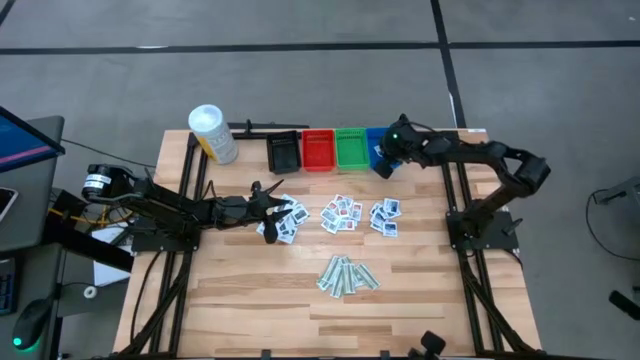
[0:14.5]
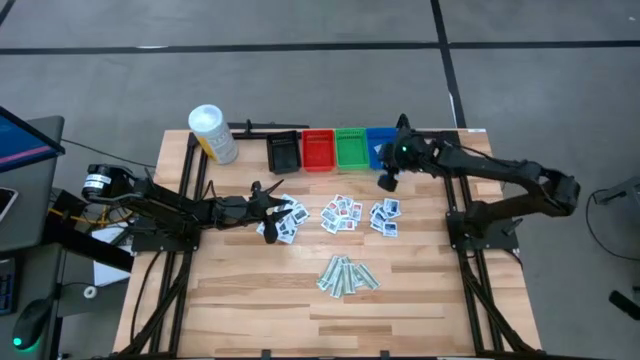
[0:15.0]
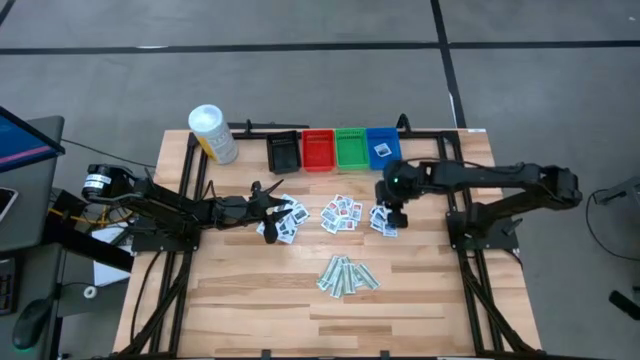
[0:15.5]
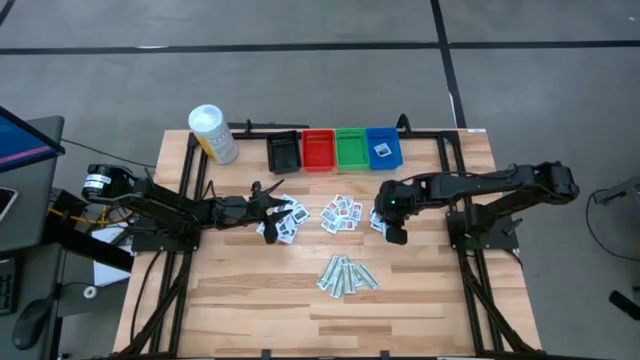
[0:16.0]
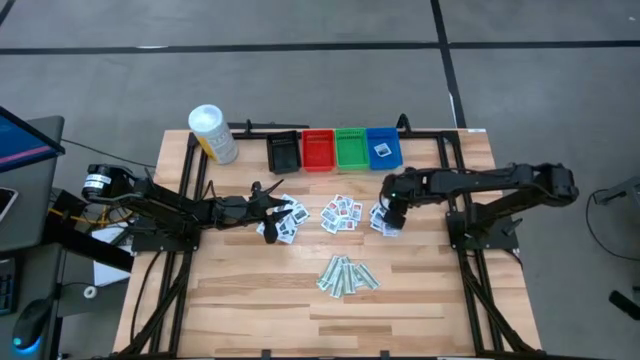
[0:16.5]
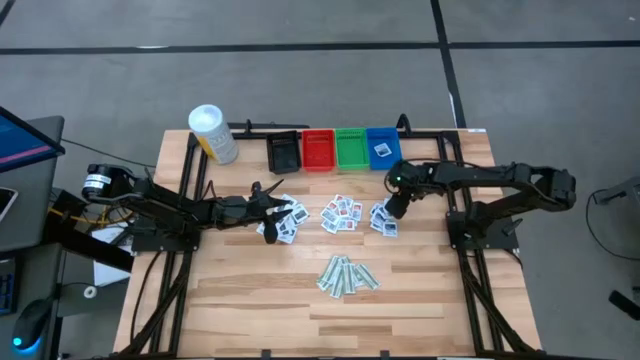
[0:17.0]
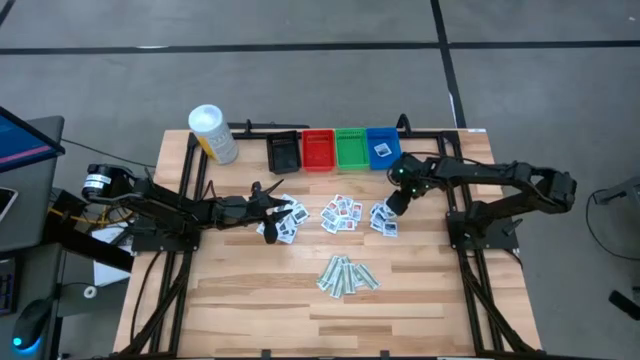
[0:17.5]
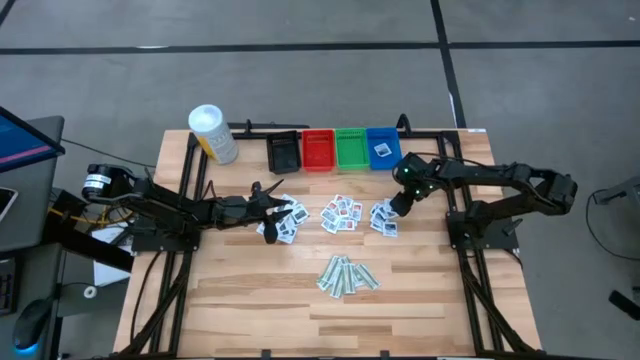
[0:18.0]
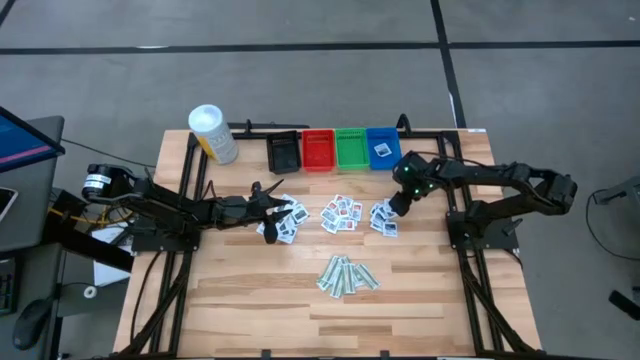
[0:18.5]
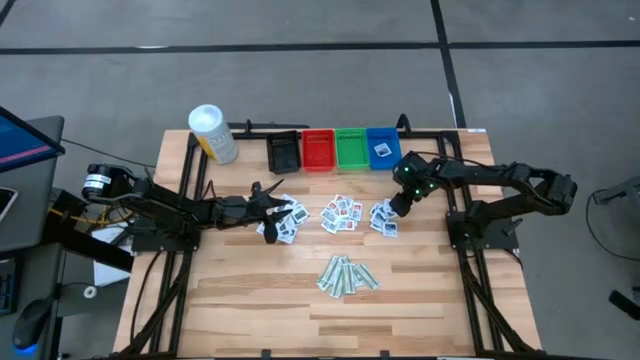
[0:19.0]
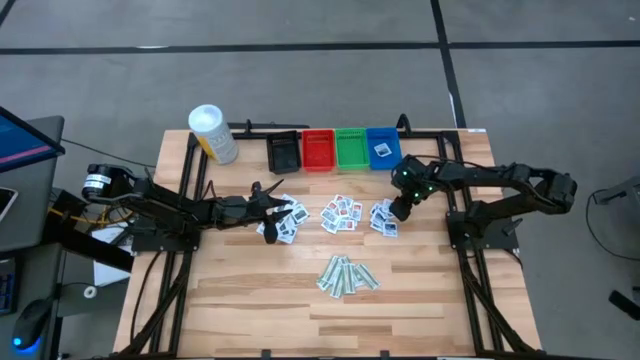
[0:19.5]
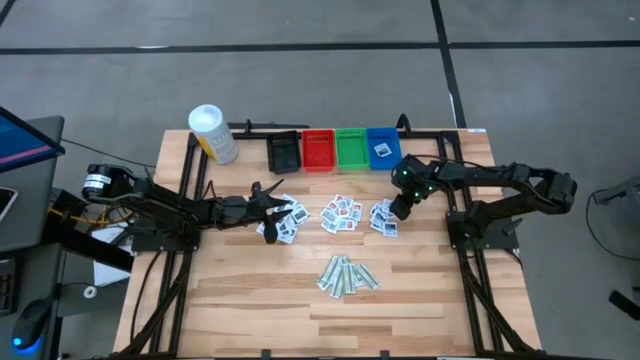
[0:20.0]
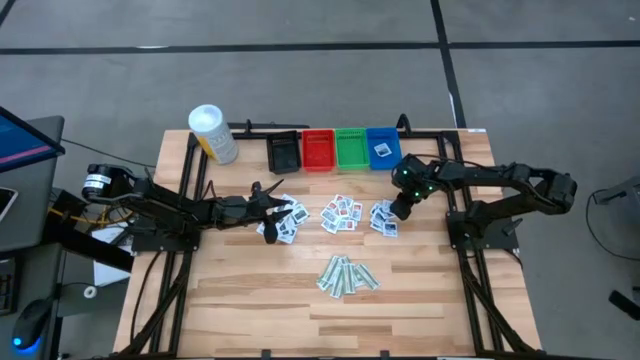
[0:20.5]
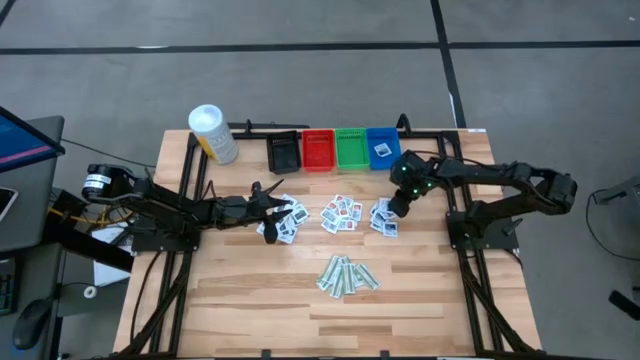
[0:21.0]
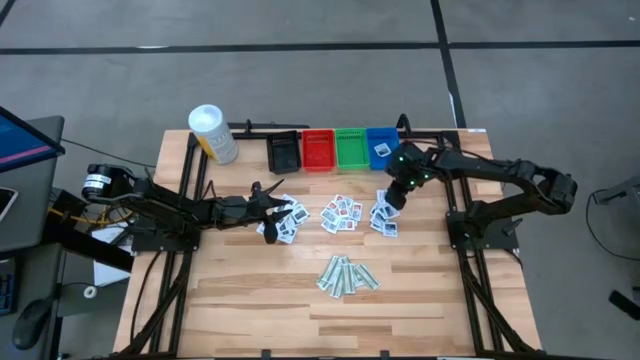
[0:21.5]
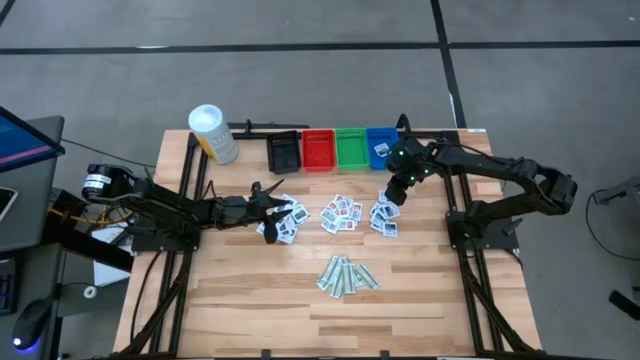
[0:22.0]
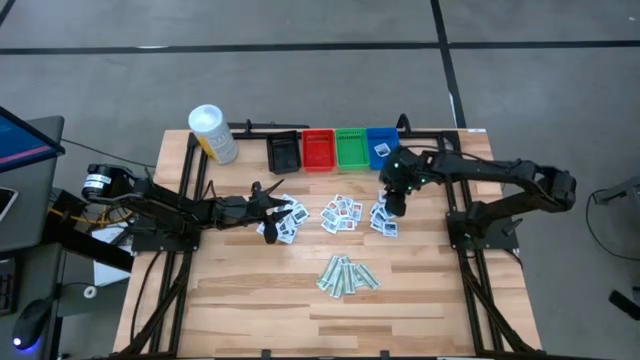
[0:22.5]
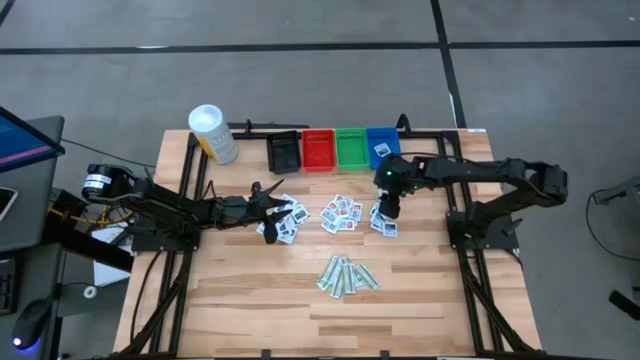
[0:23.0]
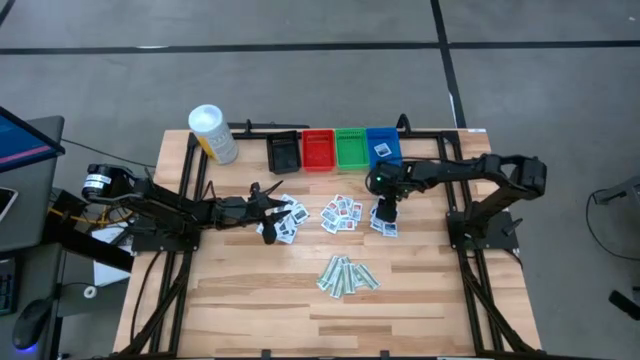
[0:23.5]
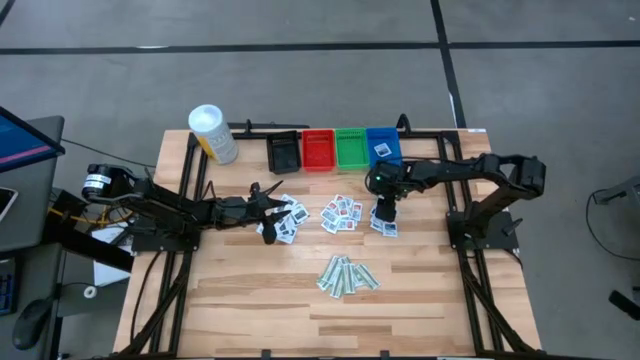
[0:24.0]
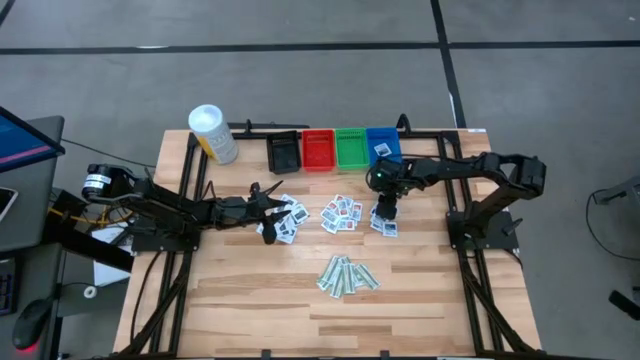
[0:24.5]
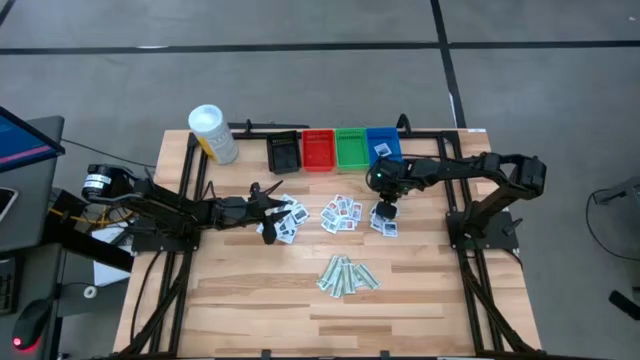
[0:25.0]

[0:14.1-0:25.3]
Task: Pick & Place First Aid Supplies
Put the blue alcohol pad into the blue bin

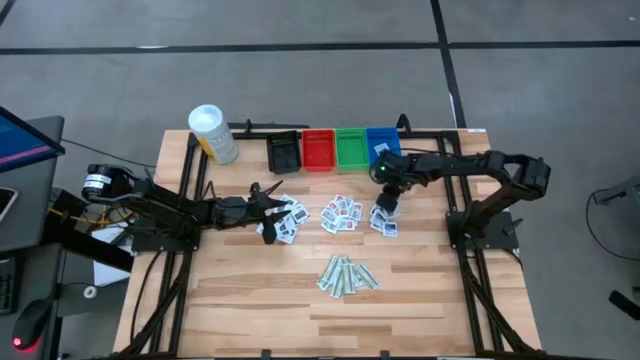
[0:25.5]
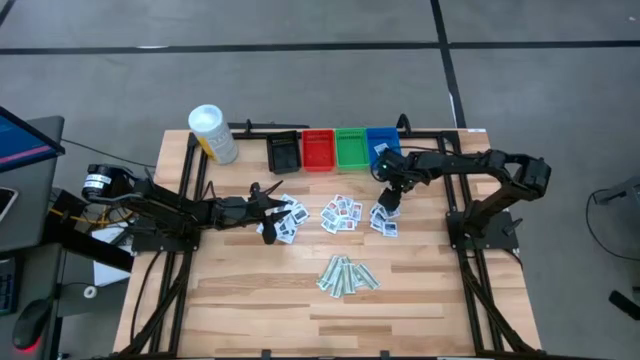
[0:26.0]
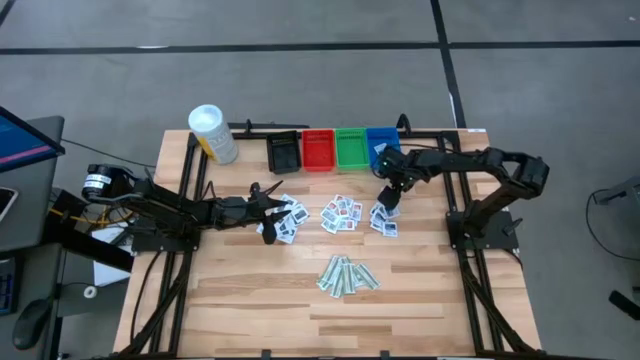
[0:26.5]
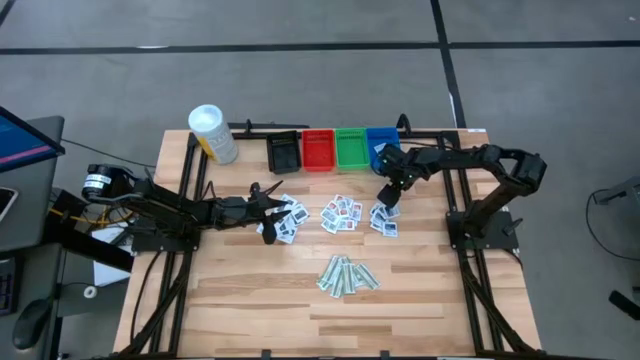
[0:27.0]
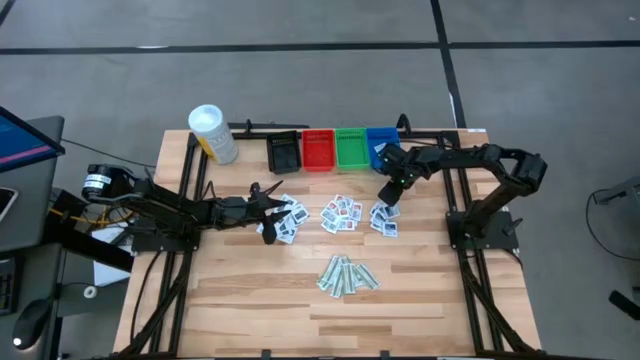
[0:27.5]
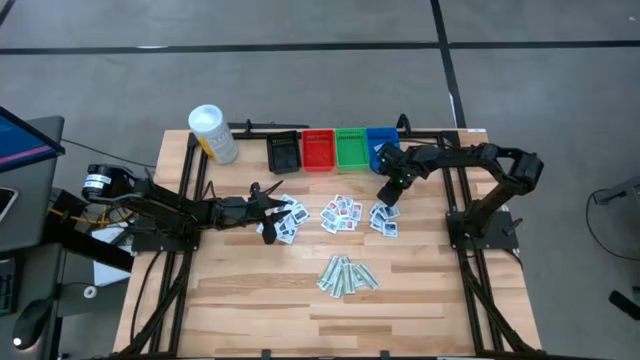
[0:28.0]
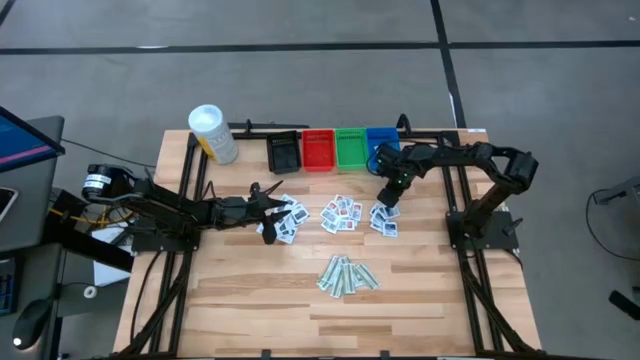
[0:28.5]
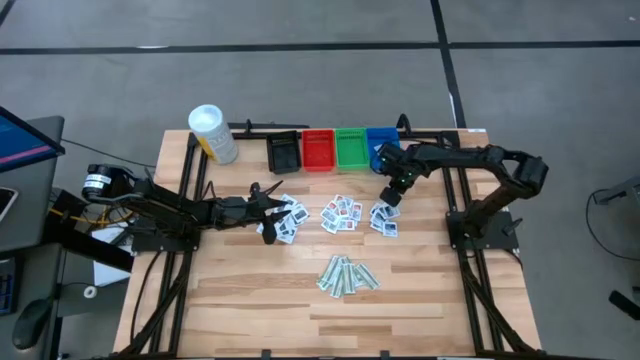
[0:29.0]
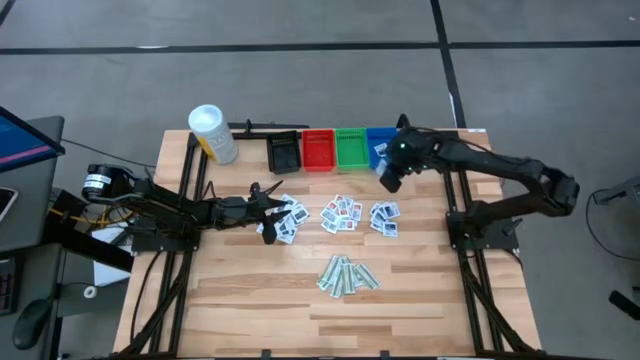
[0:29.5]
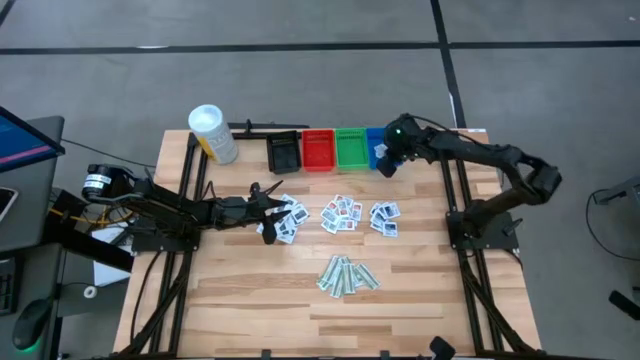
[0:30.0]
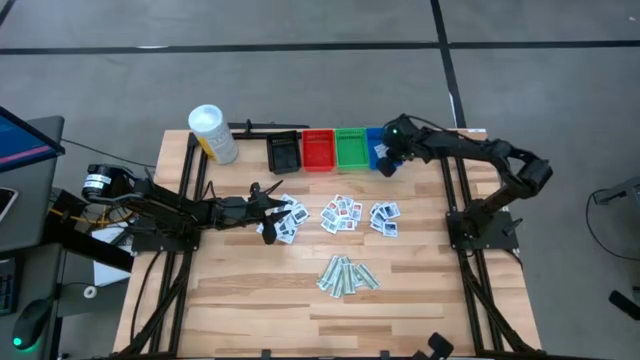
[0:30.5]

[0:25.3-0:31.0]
Put the blue alcohol pad into the blue bin

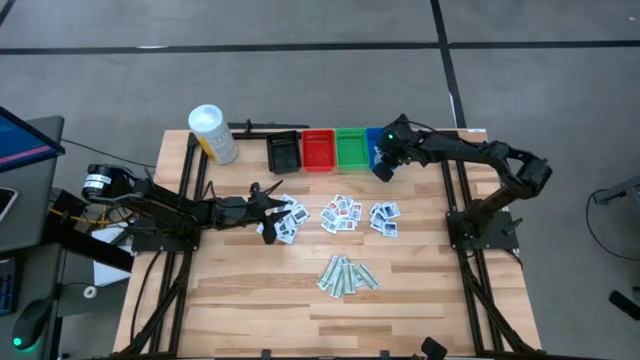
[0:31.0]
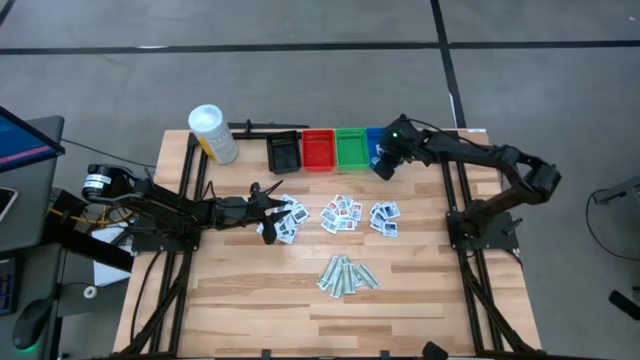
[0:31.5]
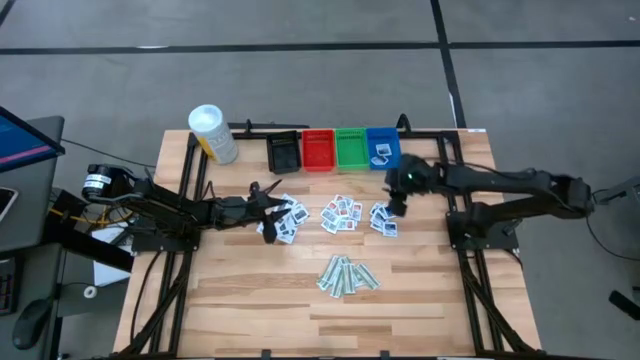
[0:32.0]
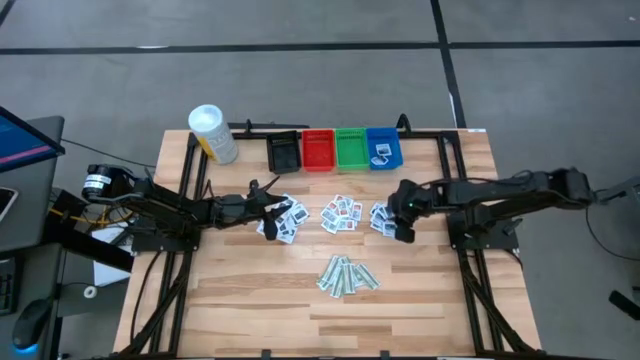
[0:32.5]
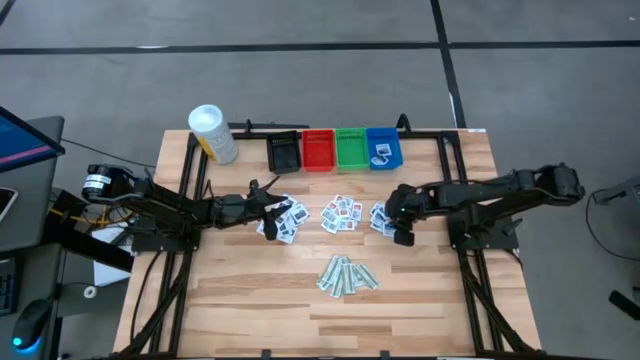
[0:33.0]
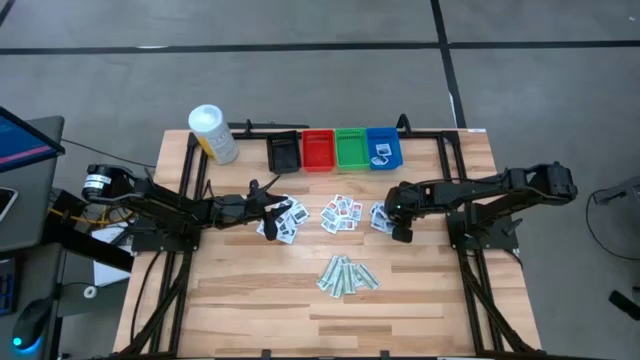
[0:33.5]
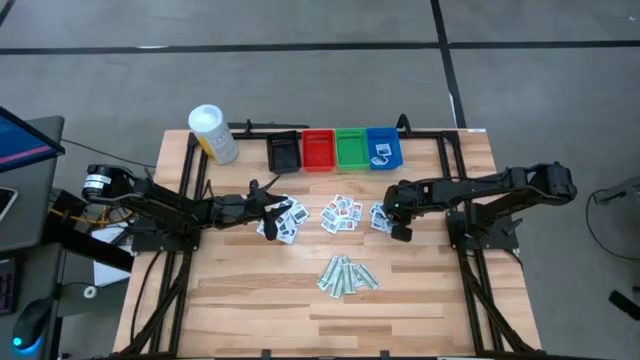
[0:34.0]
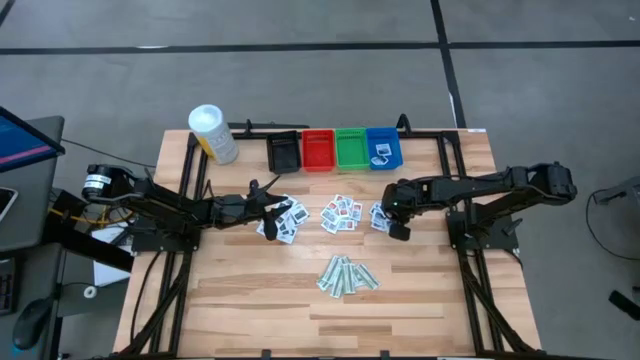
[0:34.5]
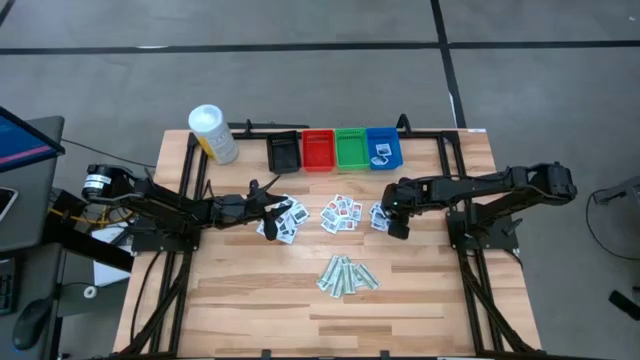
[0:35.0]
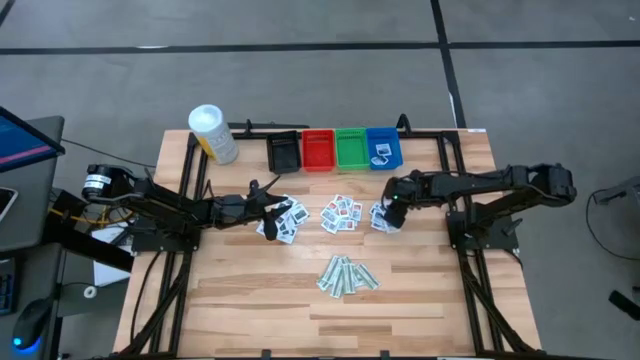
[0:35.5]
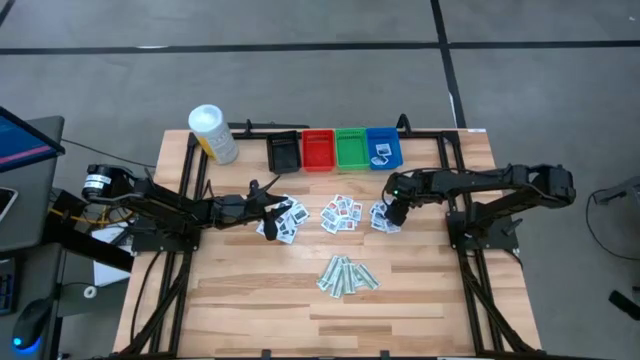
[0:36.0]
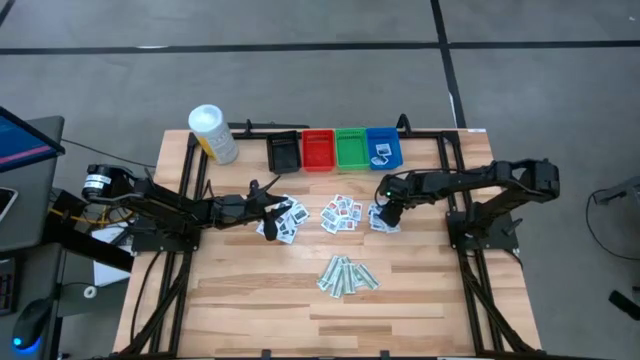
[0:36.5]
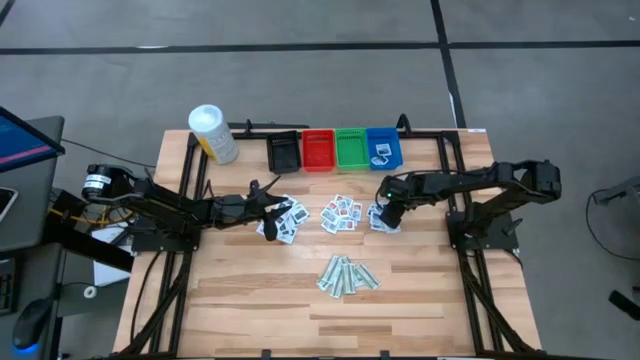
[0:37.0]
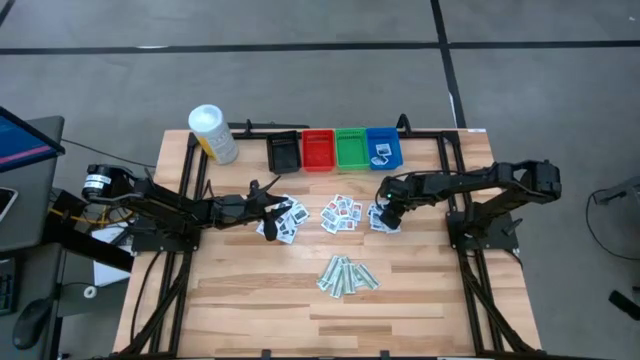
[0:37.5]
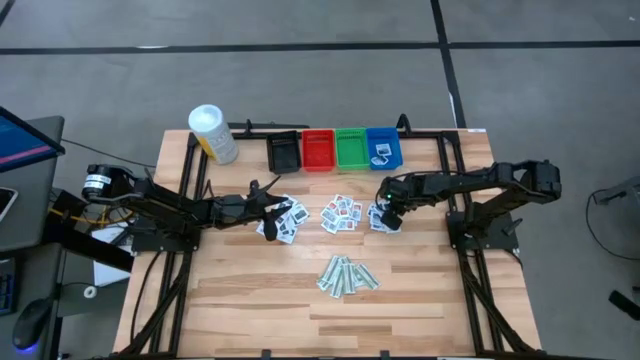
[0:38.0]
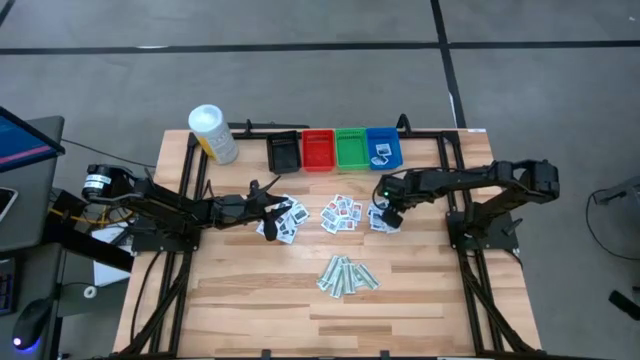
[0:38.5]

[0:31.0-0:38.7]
Put the blue alcohol pad into the blue bin
